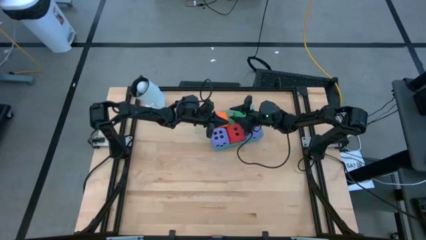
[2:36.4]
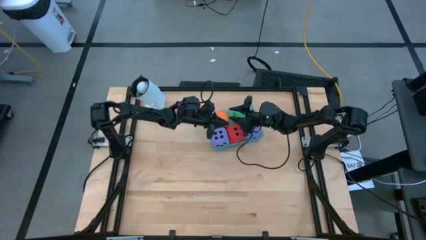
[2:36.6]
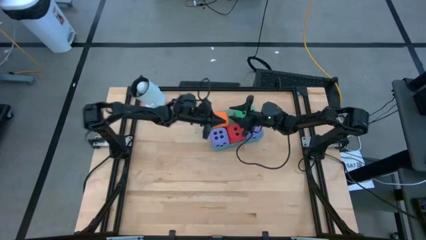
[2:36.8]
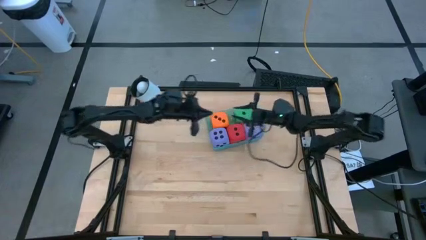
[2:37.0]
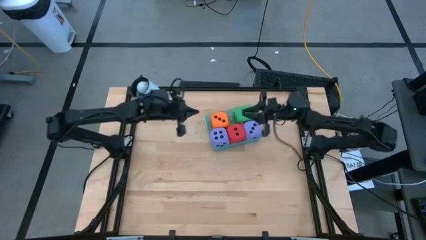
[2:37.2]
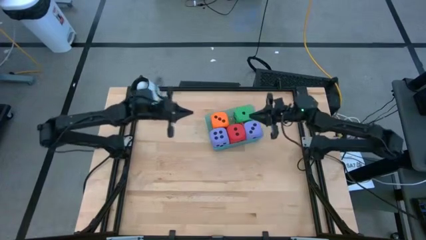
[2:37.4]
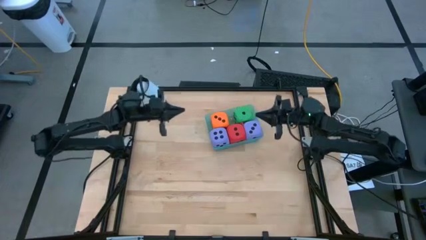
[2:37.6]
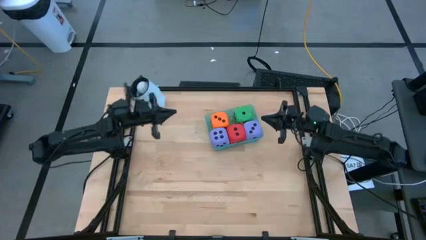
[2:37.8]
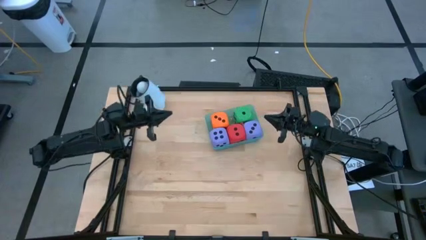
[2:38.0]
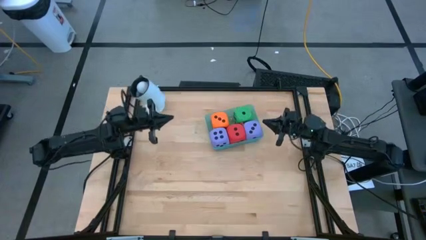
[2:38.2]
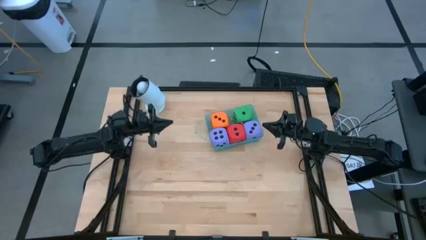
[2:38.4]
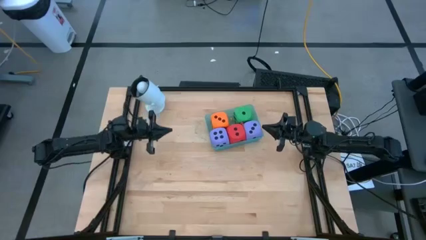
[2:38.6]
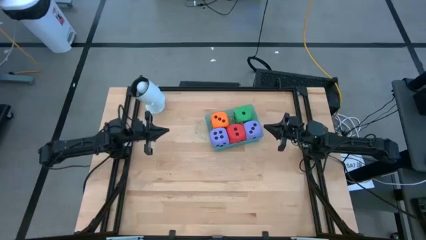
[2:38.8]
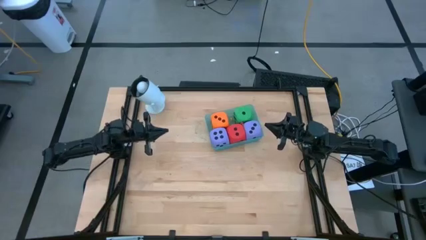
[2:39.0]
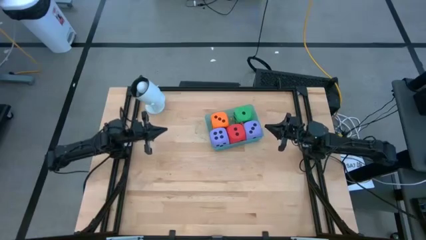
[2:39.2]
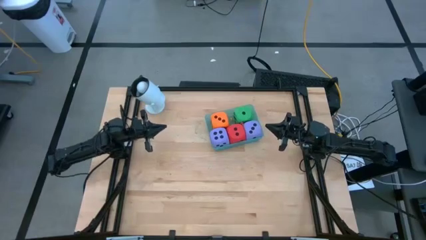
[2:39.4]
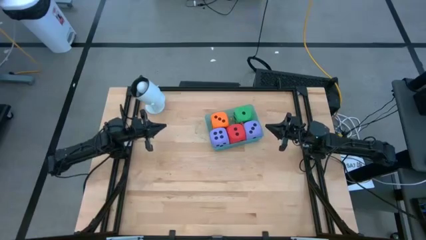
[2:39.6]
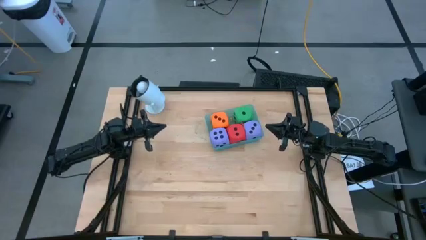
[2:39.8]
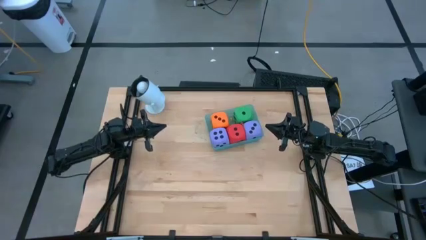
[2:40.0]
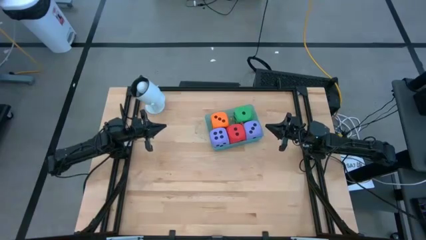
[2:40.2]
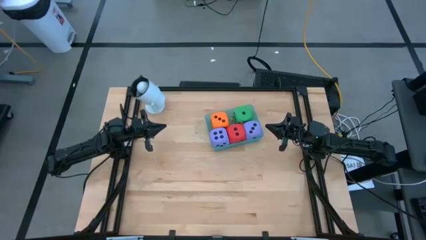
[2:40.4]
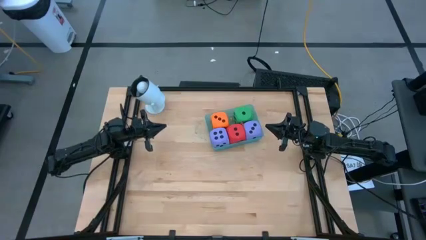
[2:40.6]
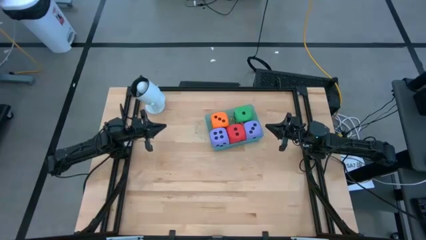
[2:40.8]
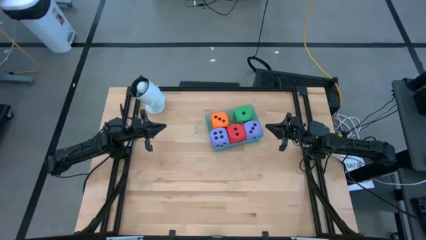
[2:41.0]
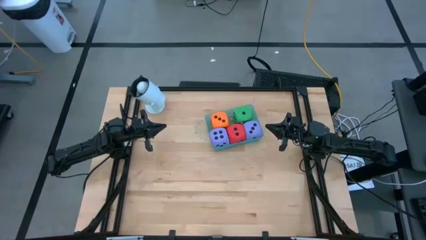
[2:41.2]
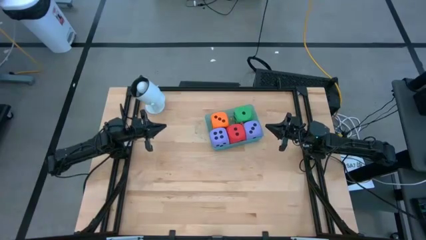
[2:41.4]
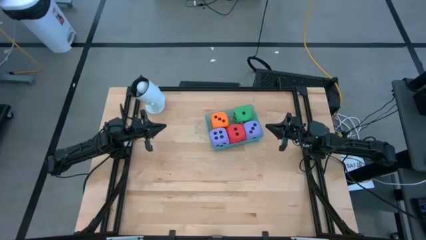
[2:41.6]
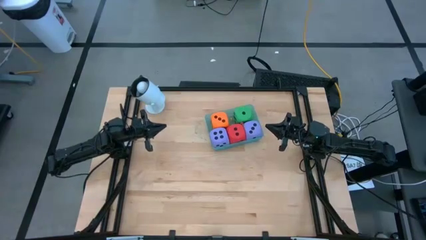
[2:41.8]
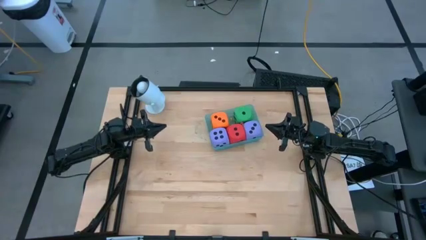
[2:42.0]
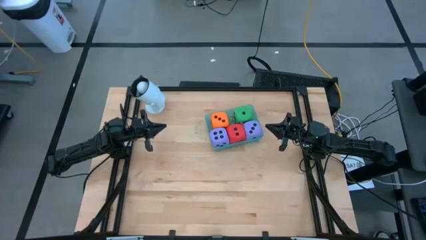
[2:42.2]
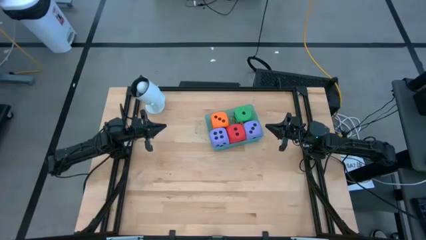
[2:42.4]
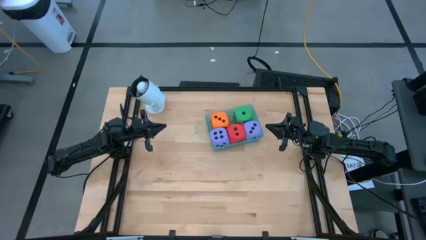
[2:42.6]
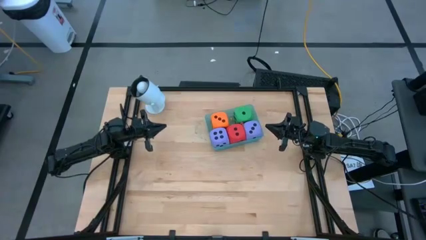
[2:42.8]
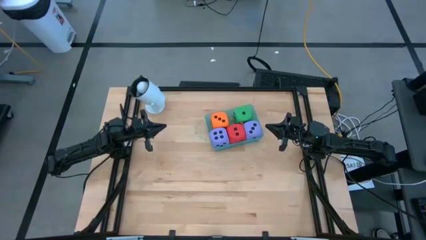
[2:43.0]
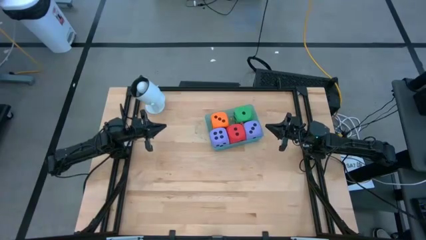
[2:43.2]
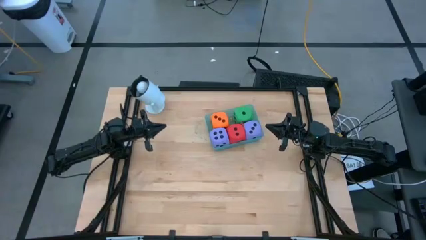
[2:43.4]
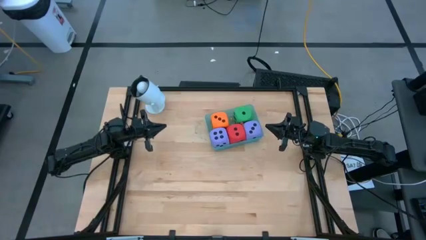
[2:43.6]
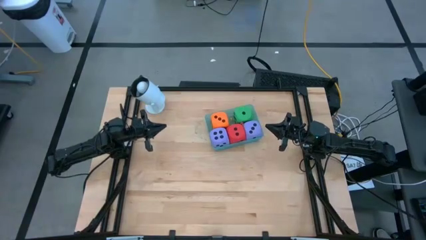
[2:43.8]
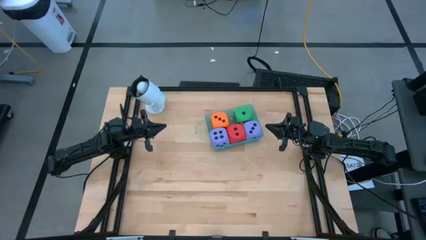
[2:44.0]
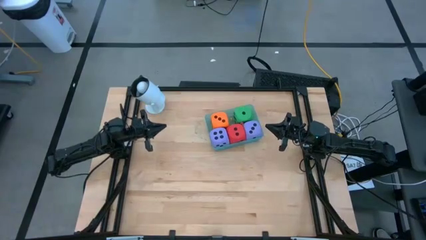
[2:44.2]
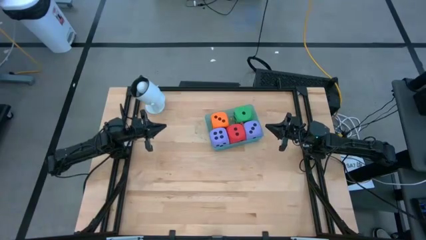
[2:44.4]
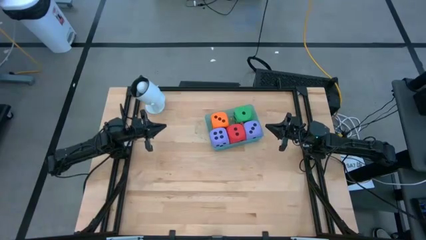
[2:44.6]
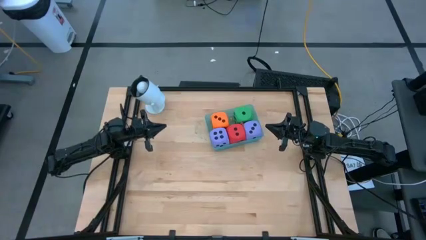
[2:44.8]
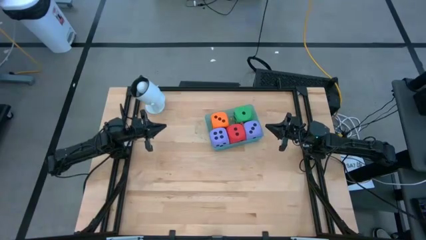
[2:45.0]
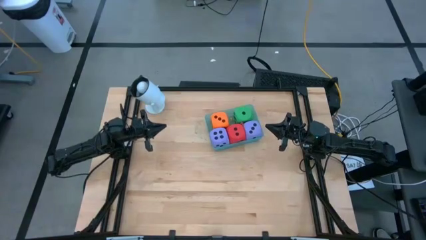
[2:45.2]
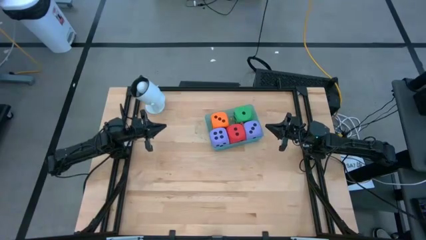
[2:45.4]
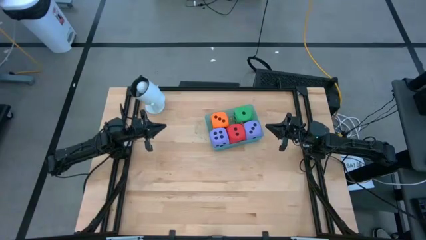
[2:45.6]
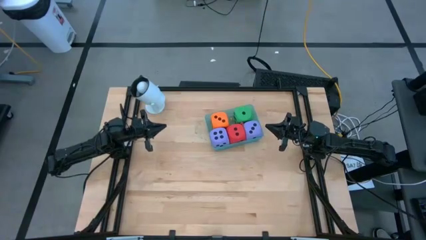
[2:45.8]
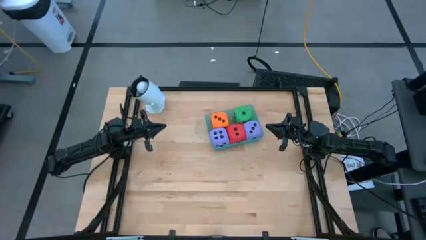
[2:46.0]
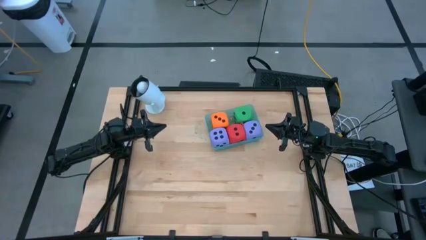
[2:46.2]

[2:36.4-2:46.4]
Task: Pick & Place Dice
Return to Home Position

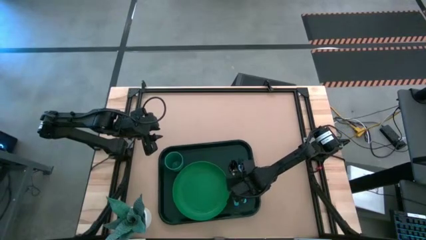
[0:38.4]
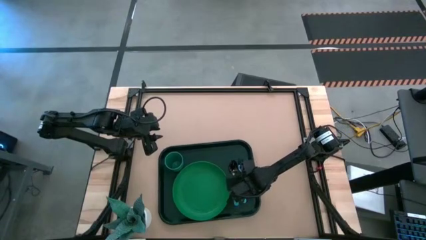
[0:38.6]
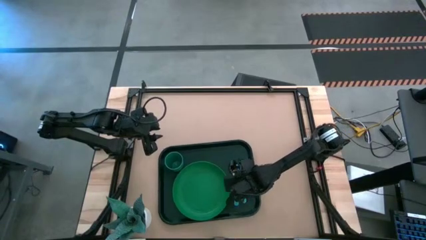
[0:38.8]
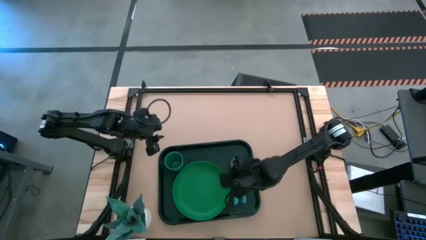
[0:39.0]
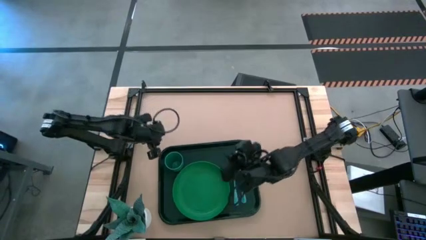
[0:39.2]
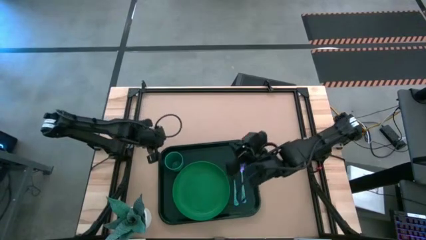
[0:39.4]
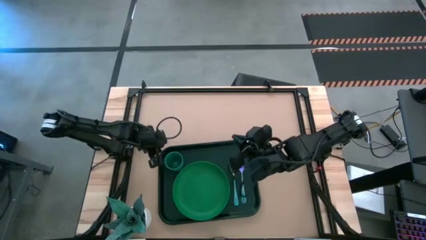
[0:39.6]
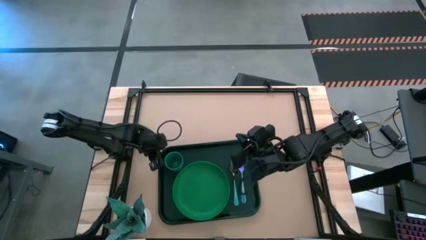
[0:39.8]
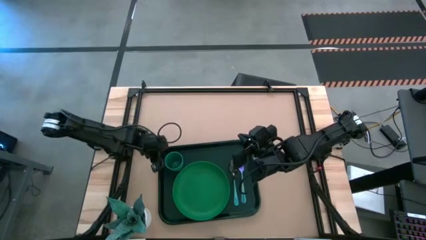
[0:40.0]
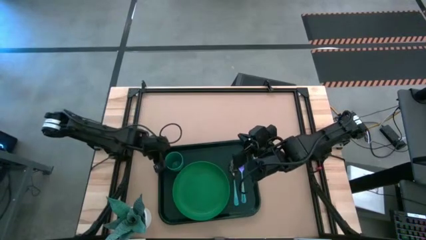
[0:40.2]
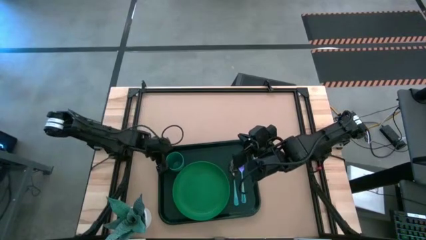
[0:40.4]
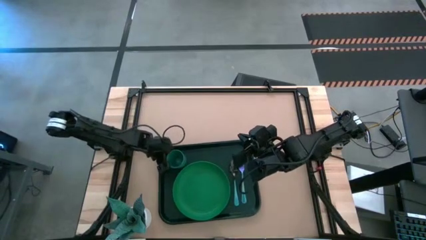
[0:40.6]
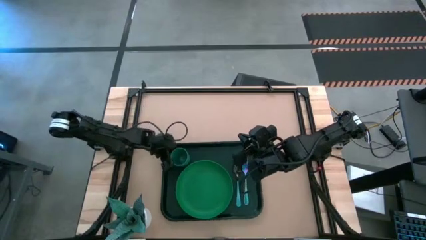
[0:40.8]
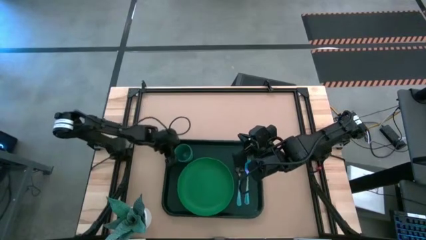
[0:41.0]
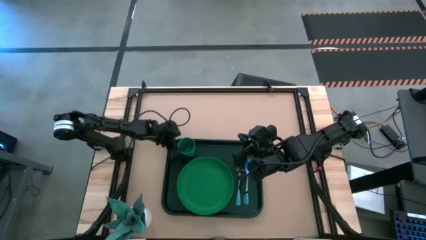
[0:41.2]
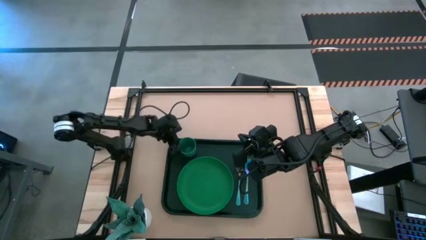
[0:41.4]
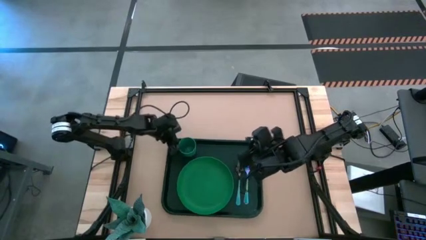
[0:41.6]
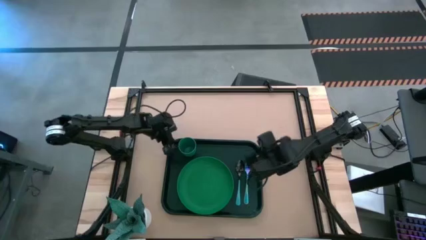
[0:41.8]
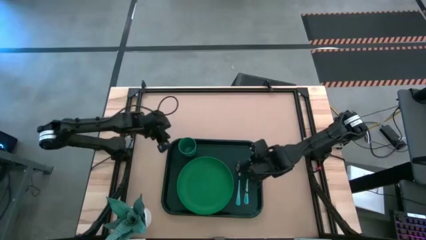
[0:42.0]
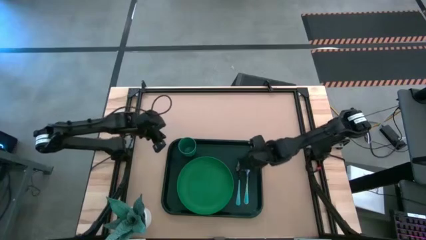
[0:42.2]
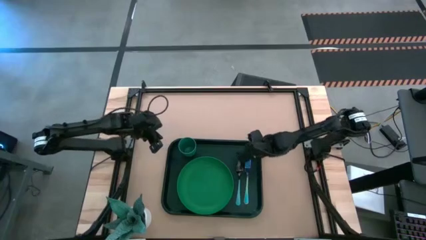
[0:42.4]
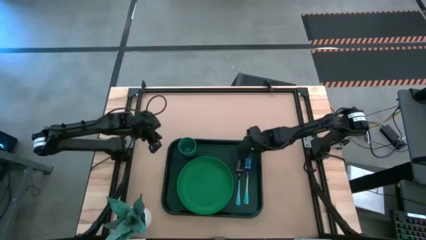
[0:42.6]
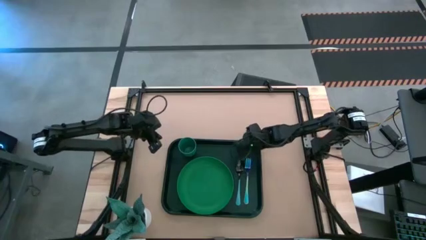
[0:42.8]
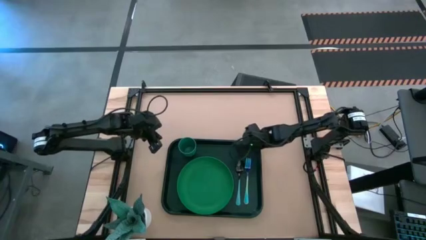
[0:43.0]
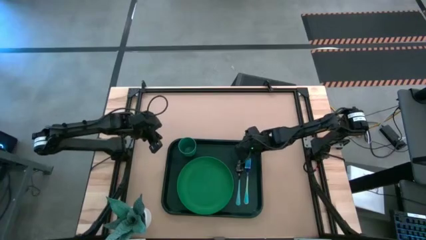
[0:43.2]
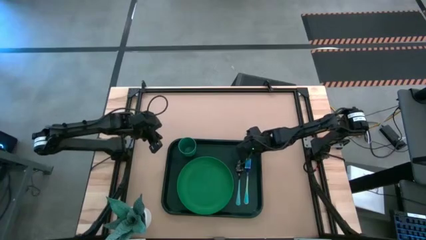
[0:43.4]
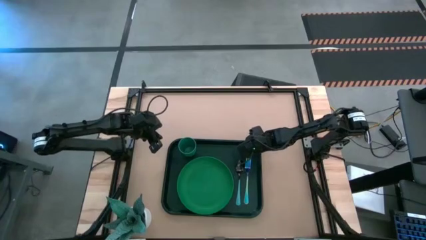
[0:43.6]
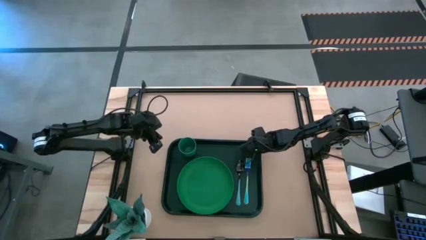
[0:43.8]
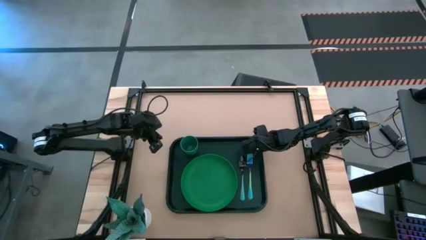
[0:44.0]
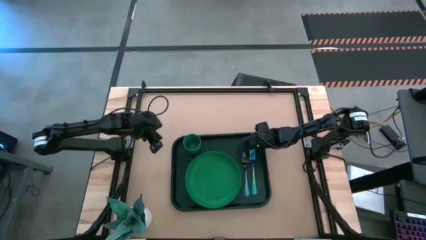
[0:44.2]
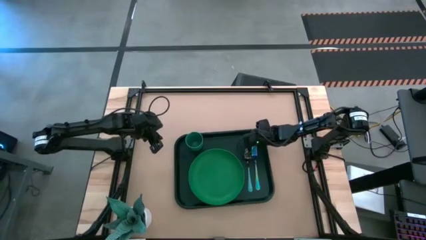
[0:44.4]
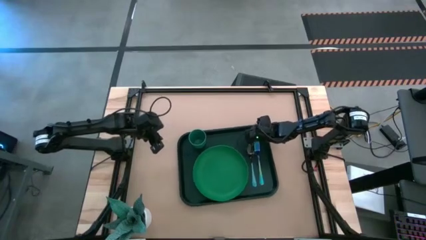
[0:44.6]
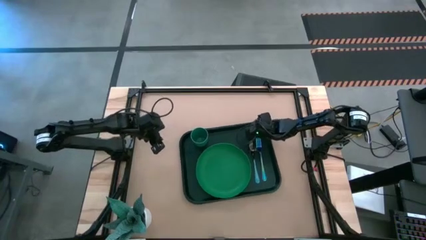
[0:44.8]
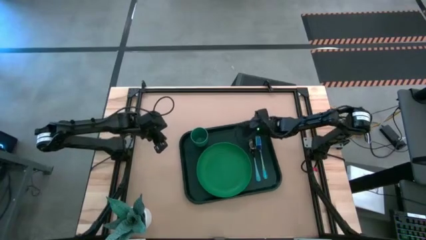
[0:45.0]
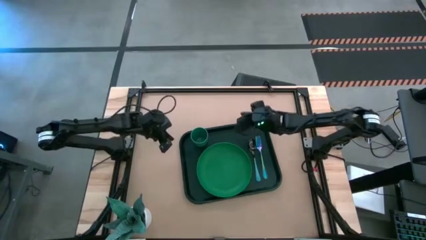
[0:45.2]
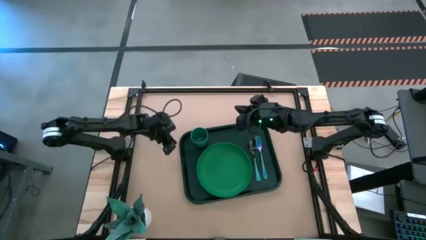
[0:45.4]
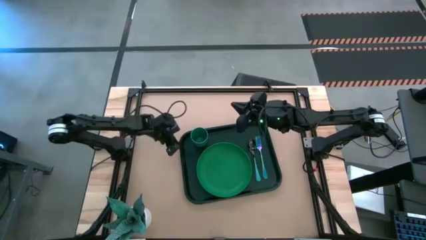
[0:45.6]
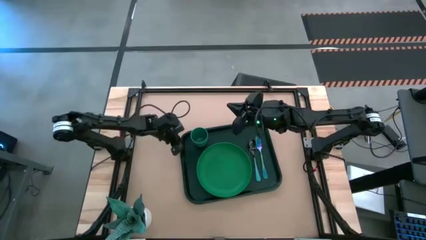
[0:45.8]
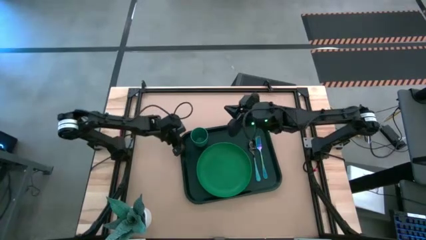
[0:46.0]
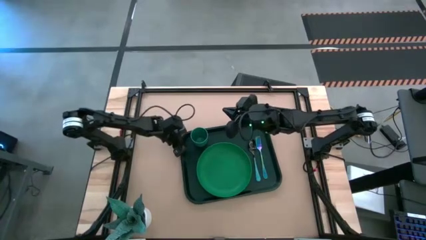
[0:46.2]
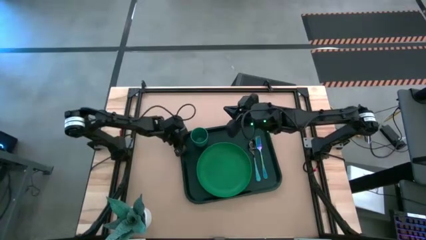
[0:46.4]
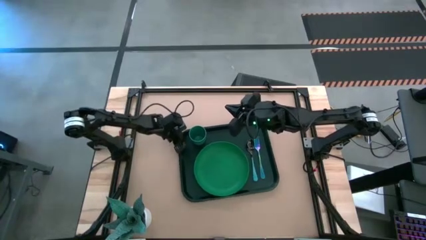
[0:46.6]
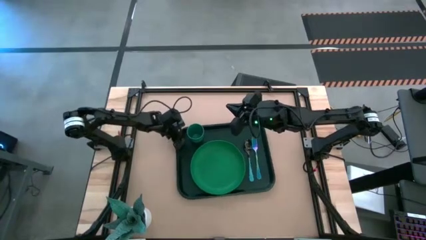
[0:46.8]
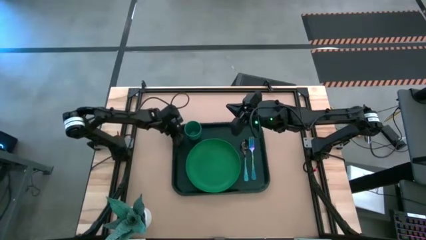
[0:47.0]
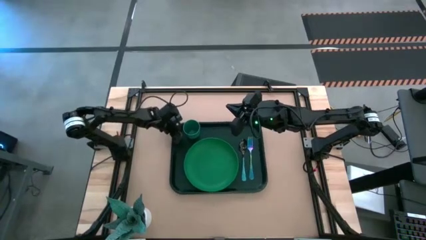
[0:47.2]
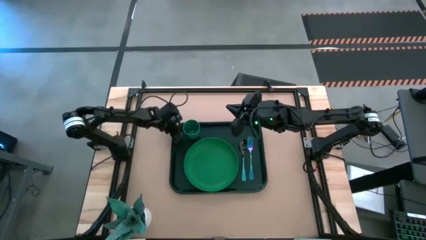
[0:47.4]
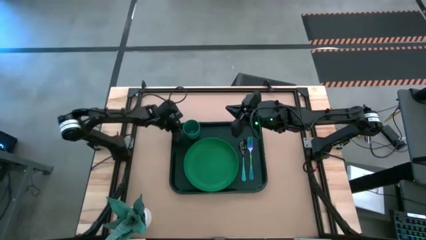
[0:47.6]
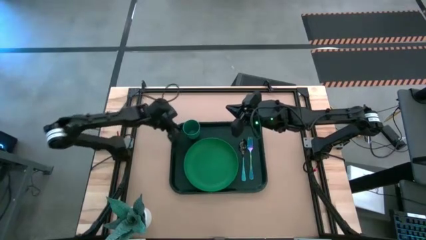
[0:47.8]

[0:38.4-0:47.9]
Task: Pick and place plate/cup/fork/spoon on tray
Move the dark green tray to the center of the table
